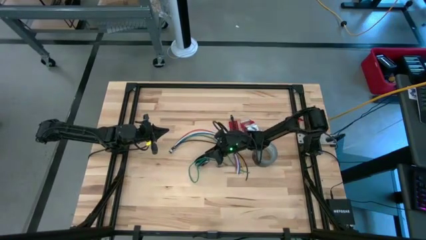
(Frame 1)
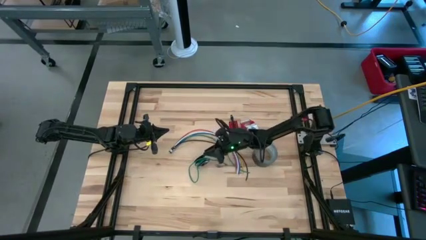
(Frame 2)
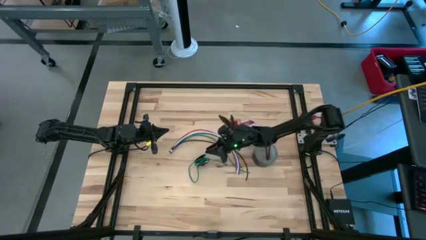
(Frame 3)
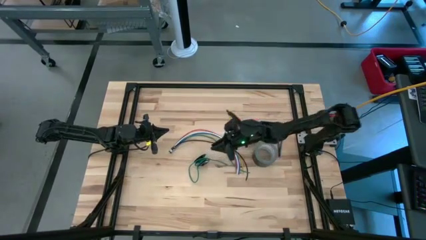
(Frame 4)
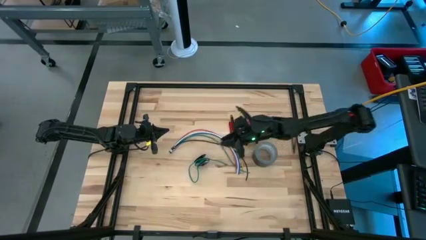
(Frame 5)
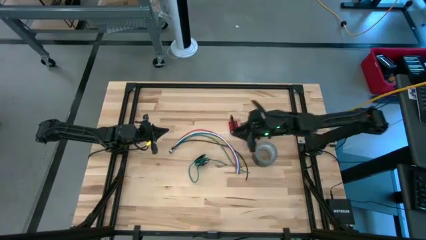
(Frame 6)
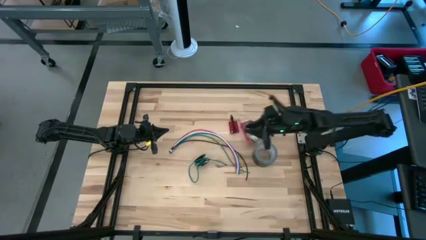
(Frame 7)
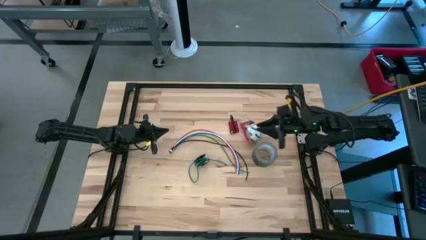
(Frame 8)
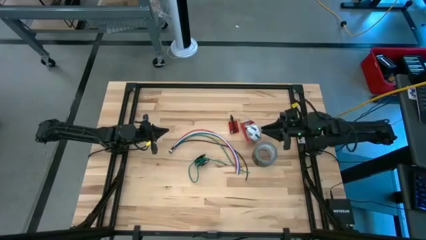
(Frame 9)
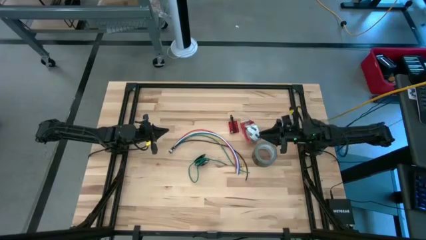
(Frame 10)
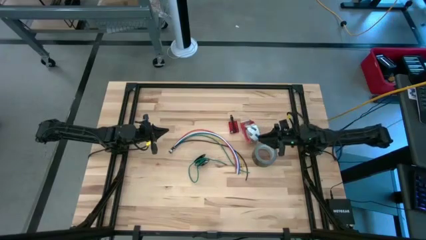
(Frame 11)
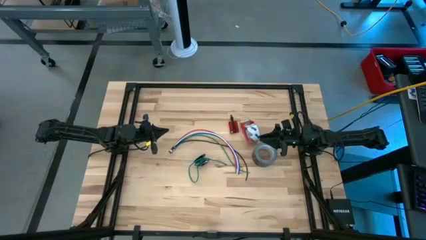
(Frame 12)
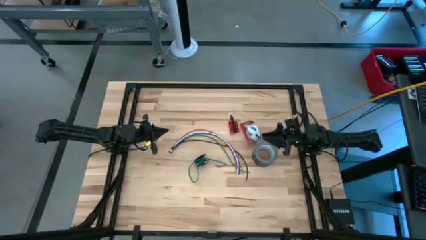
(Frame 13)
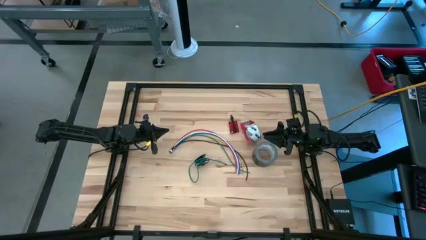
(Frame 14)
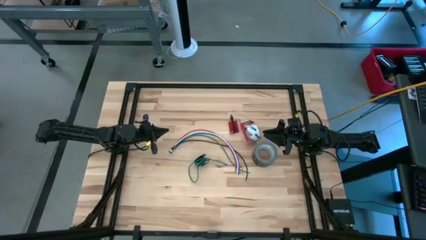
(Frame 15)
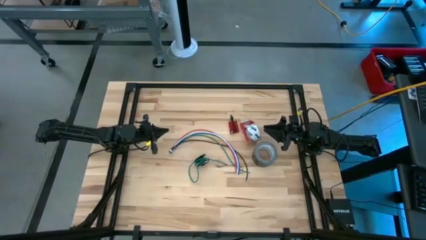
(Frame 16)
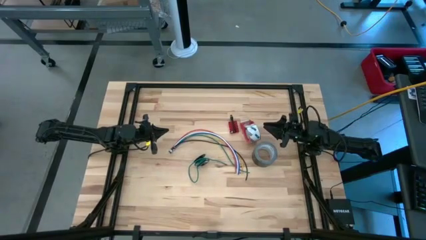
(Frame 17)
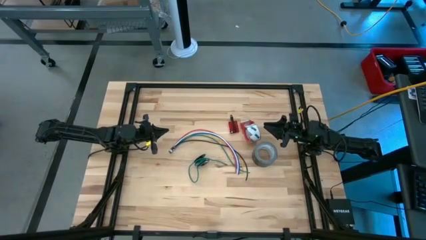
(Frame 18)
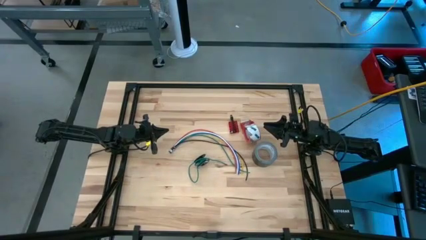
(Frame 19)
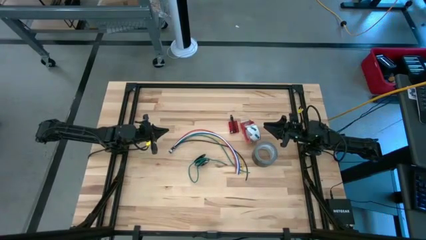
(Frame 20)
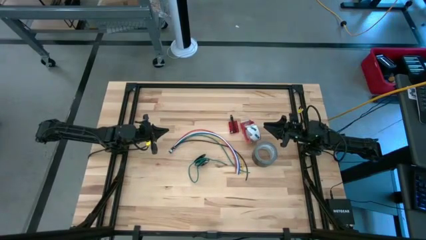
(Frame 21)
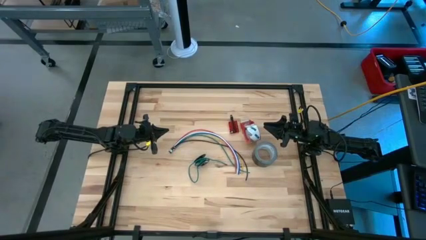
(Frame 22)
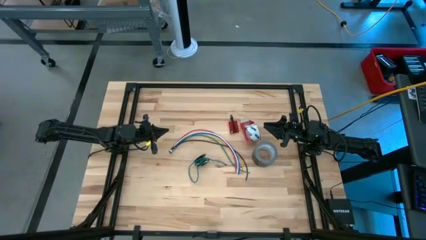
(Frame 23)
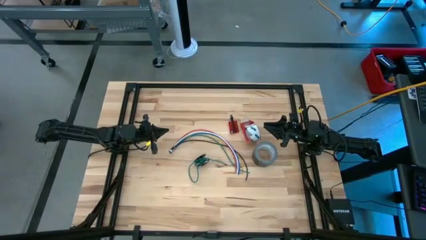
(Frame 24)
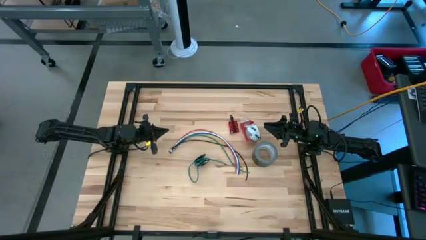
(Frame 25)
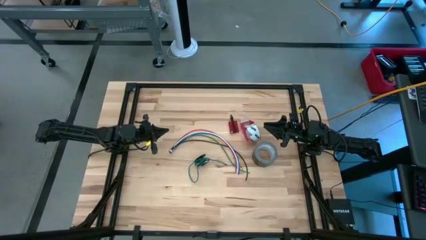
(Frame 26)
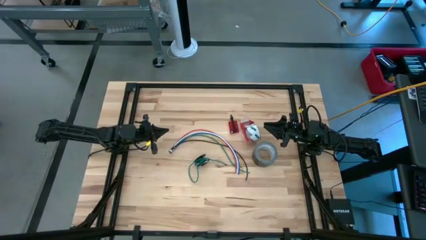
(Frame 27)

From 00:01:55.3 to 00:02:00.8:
Task: Coil cords
Return to Home Position

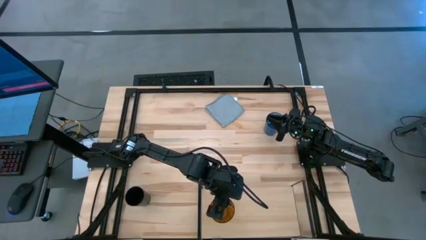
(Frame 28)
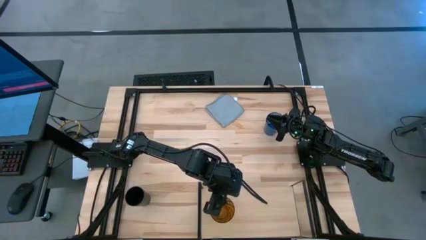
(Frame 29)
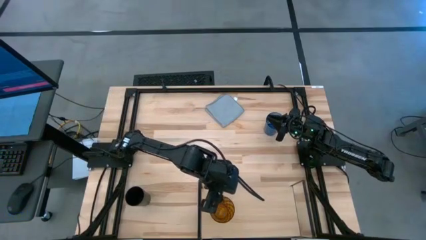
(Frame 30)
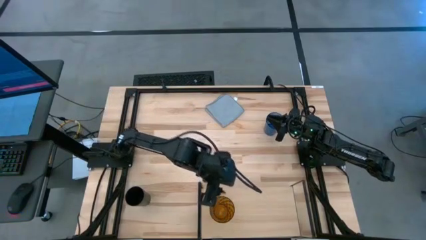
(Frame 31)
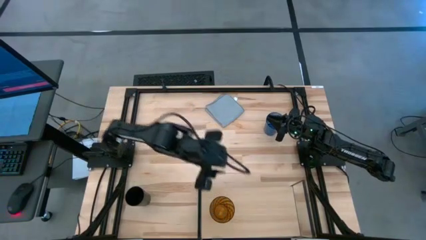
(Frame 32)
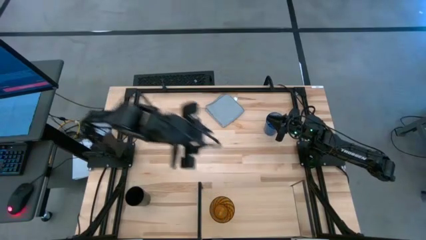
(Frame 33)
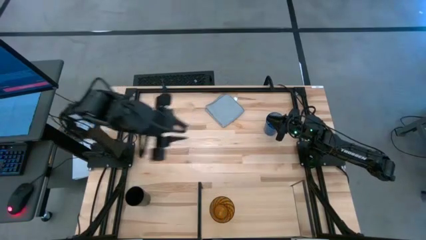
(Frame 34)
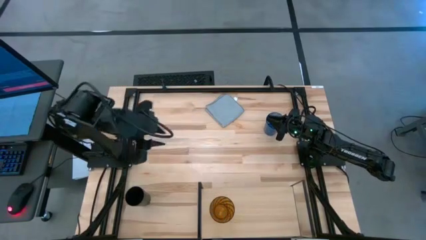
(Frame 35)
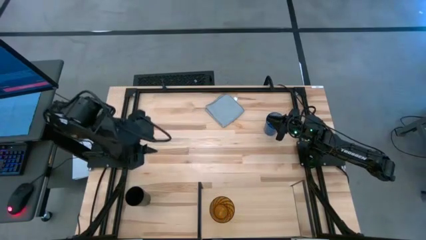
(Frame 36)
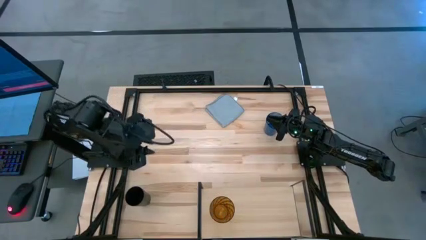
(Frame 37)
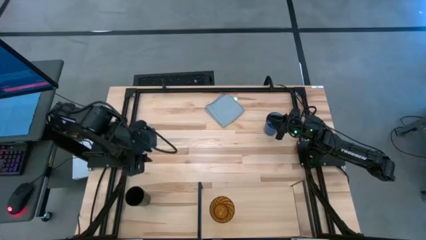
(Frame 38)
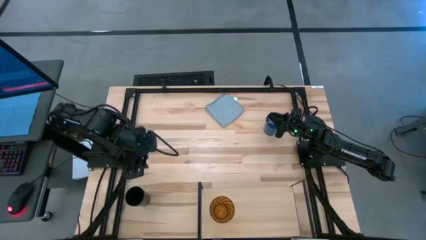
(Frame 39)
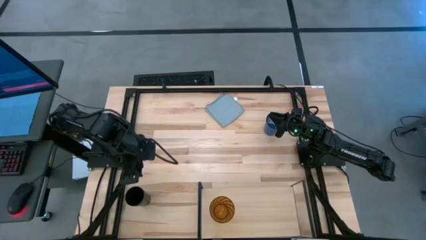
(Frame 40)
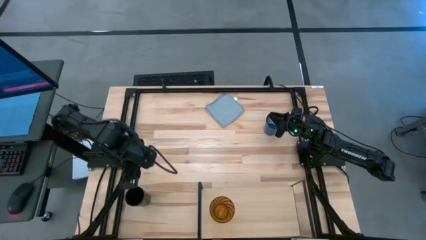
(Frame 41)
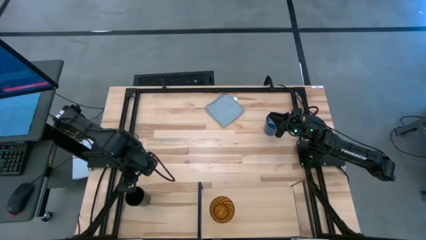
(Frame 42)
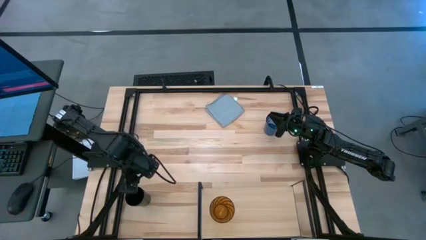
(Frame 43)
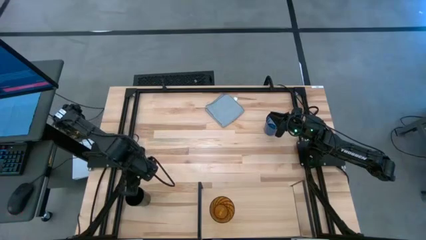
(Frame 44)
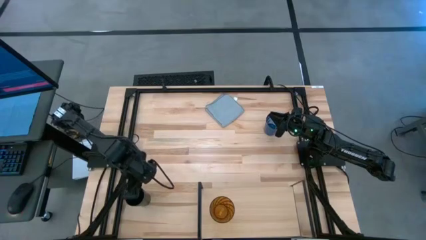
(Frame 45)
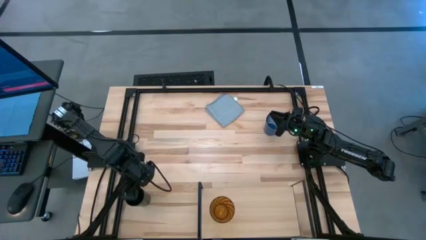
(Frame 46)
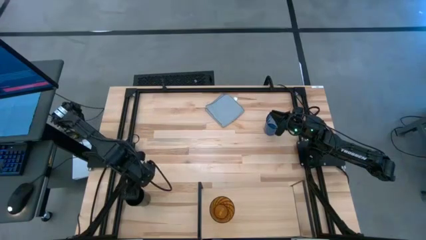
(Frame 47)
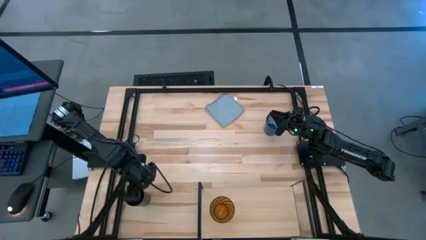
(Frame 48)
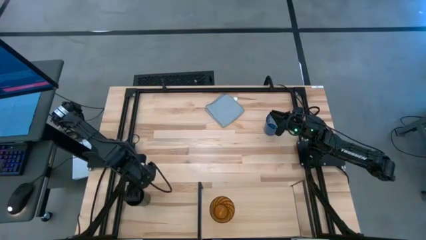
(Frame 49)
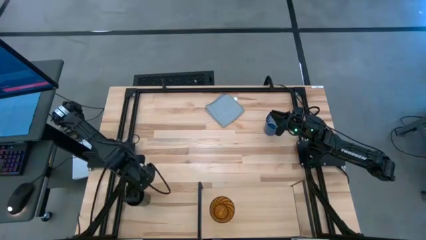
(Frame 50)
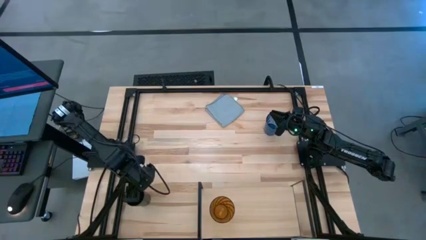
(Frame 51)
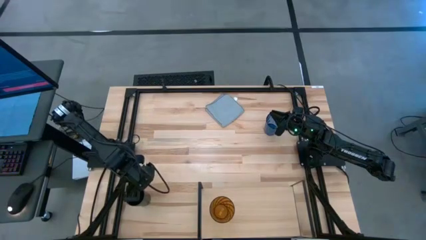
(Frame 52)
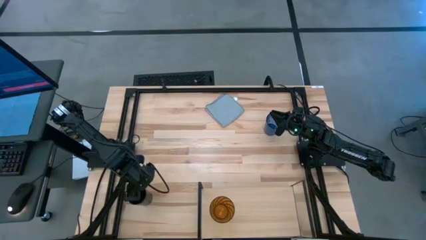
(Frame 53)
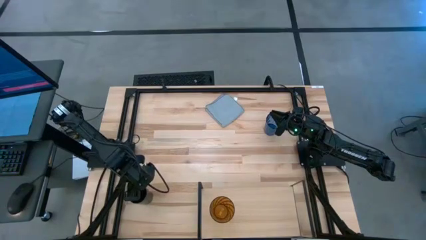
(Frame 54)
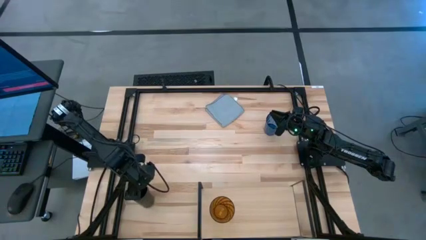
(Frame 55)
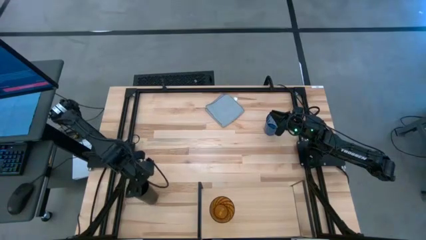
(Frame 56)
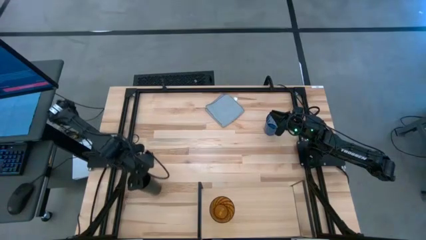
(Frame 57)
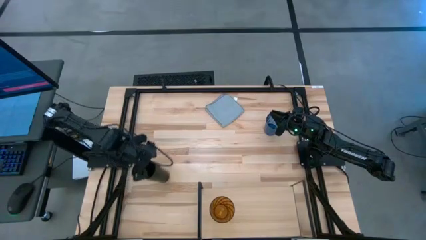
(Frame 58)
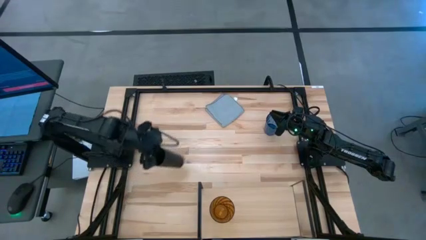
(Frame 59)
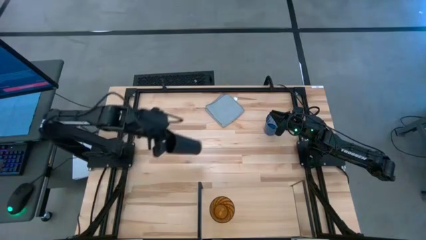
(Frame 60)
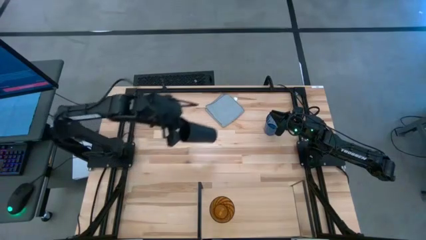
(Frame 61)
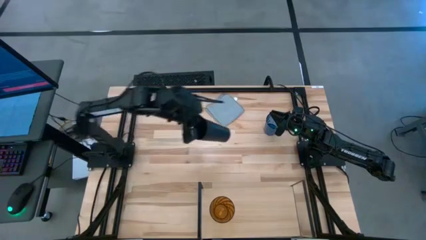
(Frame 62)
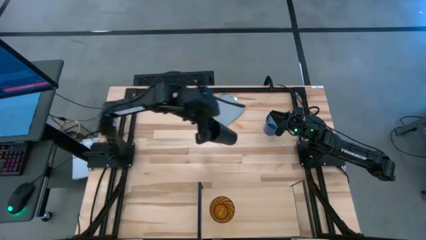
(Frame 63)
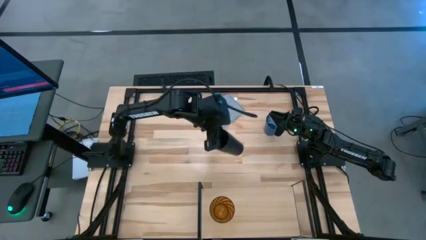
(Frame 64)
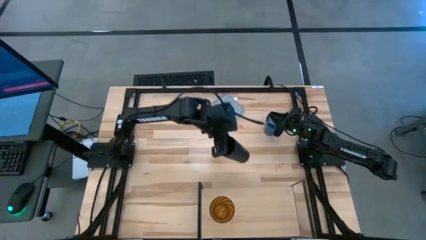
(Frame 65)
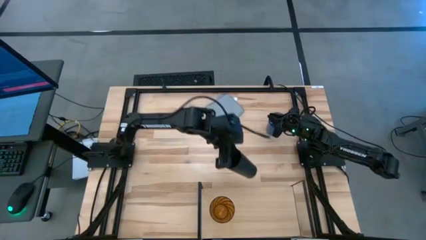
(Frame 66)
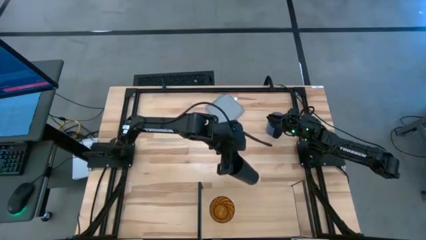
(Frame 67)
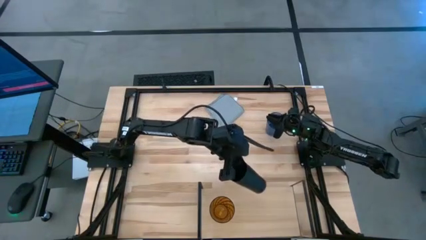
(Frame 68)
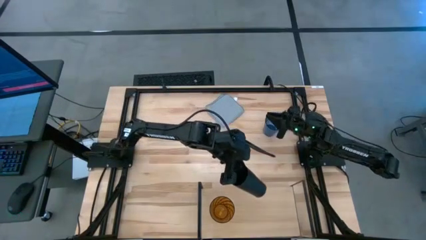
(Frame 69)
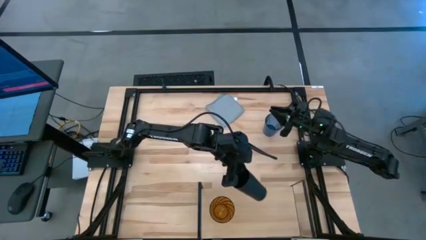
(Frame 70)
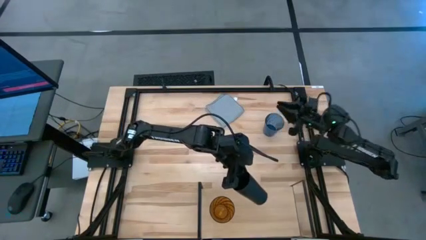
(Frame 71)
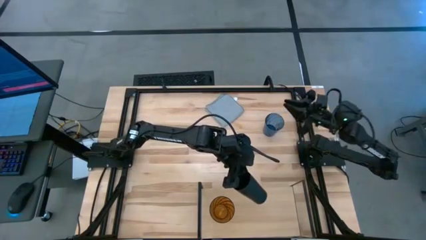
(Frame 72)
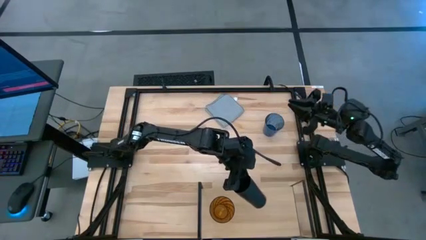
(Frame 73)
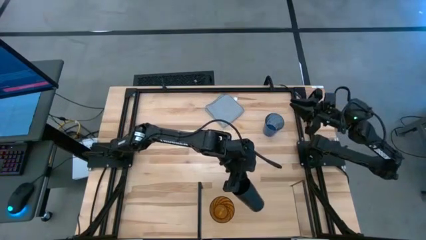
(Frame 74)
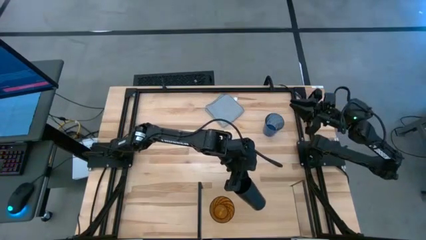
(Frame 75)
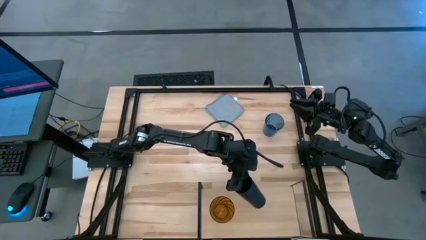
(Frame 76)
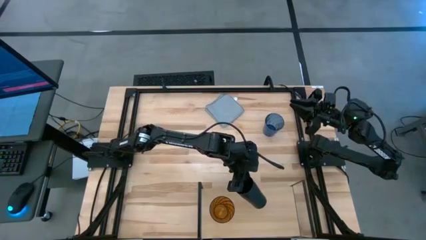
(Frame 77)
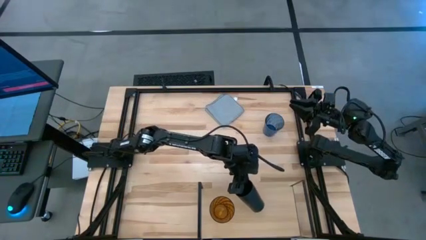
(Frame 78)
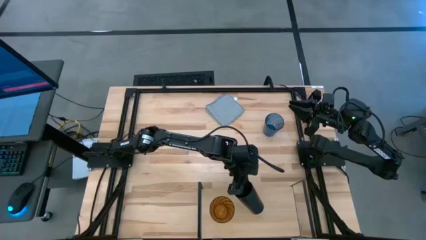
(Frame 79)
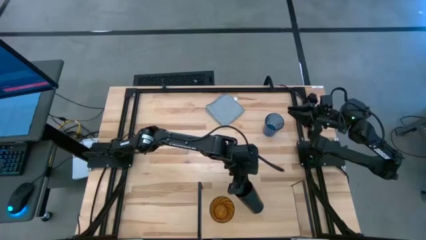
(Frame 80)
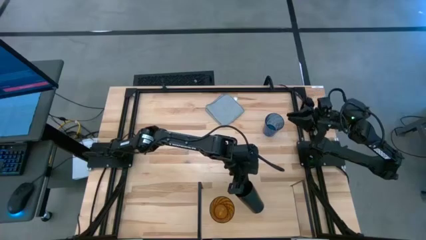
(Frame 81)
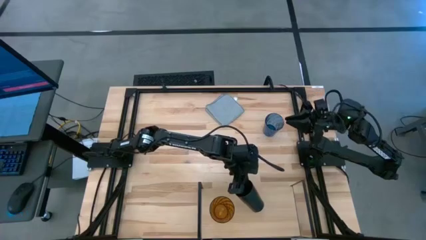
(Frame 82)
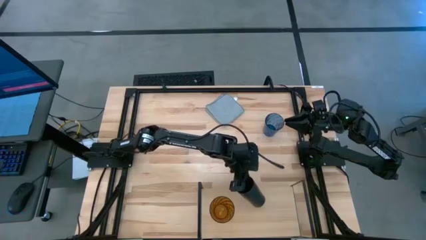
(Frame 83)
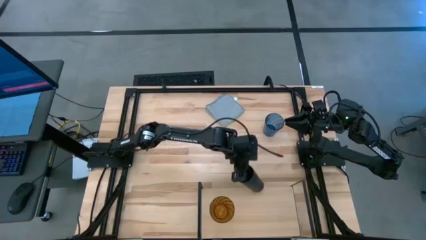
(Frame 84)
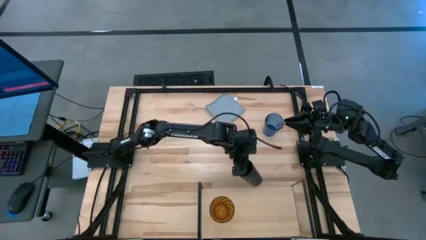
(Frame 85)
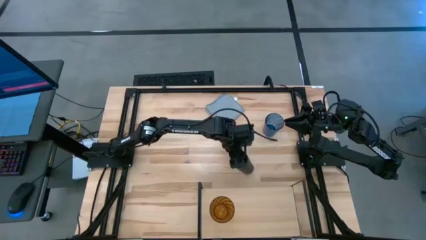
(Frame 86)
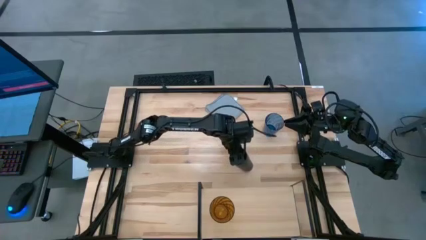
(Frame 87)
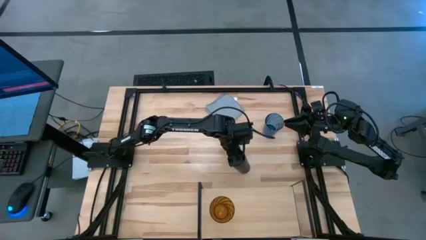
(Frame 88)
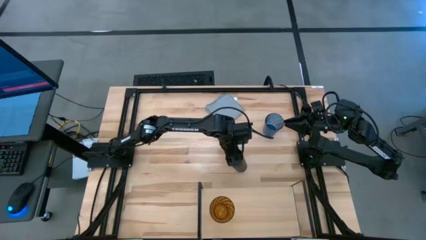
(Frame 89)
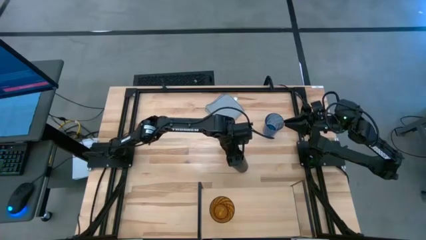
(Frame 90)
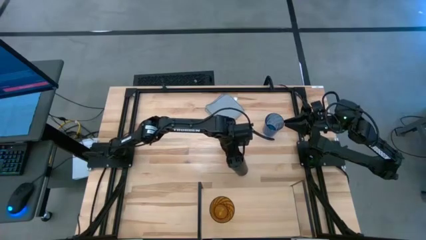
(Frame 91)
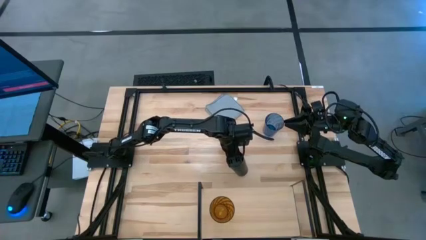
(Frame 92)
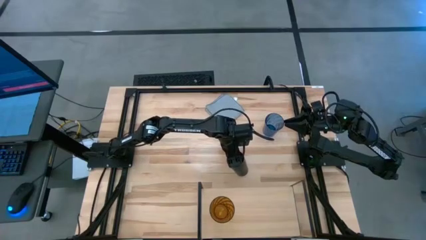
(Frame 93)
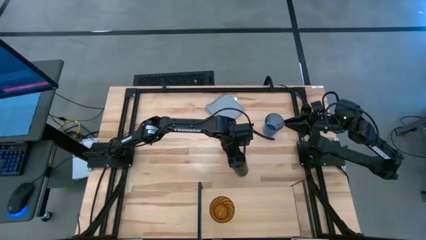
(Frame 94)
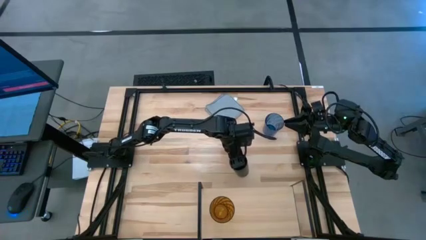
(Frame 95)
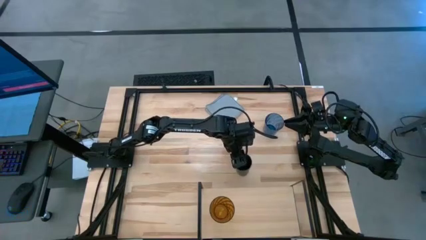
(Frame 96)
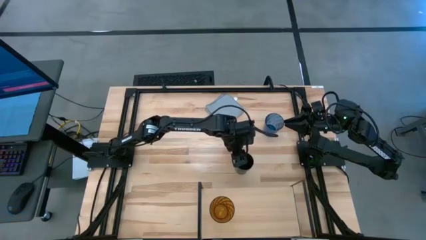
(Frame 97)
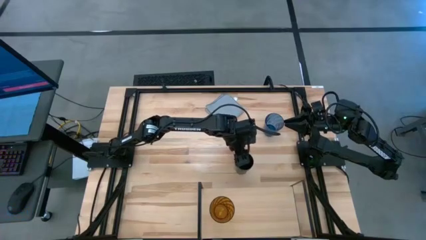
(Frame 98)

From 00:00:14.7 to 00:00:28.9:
Task: Stack small to large cups/mugs on shelf
Put the black cup on the shelf
